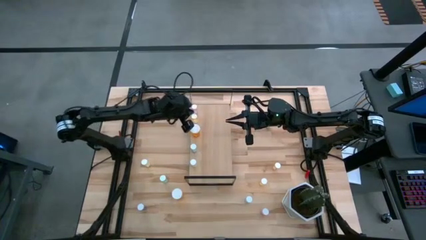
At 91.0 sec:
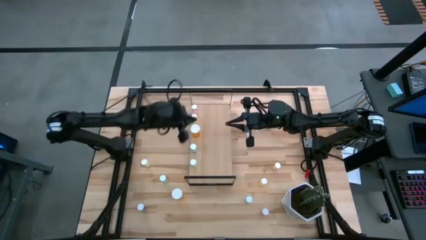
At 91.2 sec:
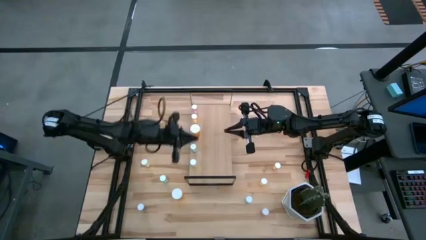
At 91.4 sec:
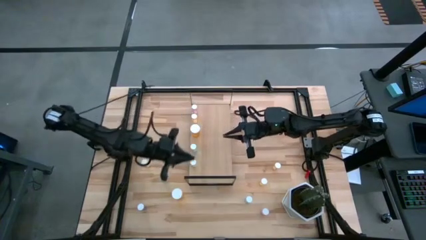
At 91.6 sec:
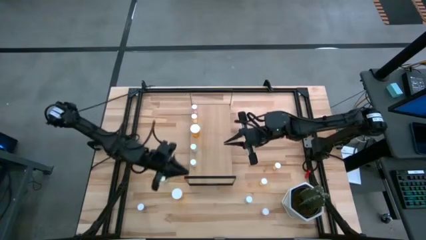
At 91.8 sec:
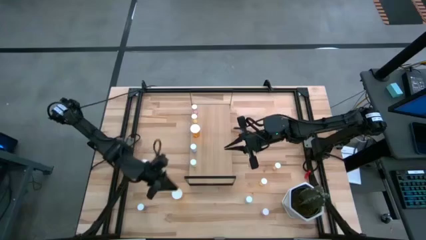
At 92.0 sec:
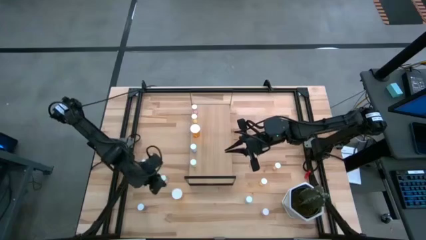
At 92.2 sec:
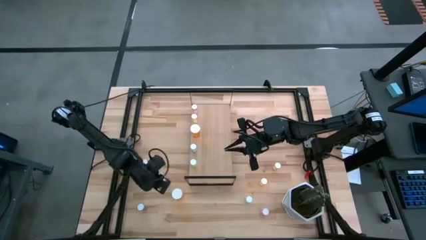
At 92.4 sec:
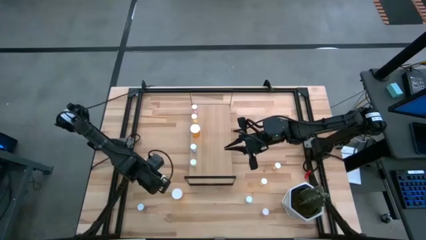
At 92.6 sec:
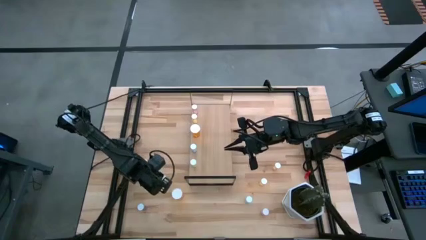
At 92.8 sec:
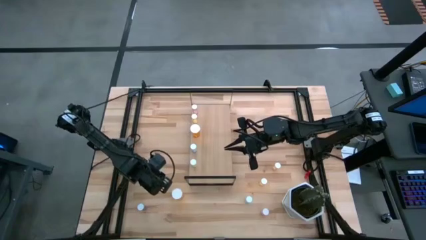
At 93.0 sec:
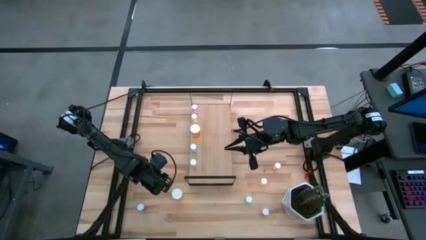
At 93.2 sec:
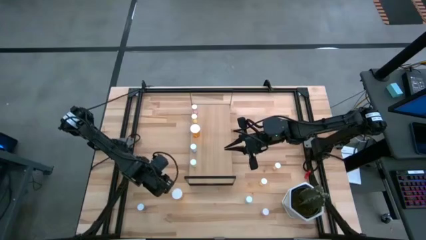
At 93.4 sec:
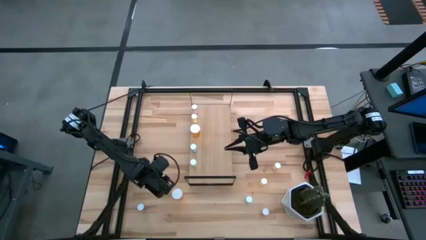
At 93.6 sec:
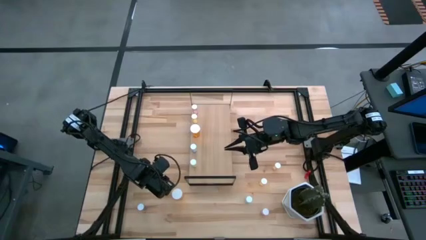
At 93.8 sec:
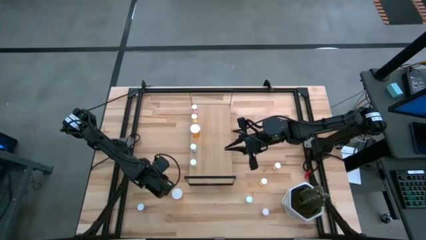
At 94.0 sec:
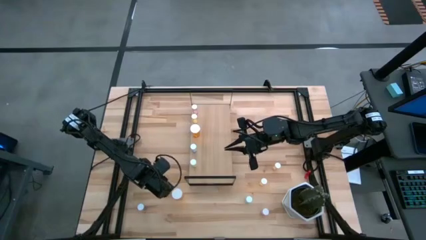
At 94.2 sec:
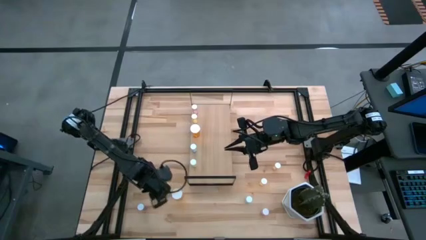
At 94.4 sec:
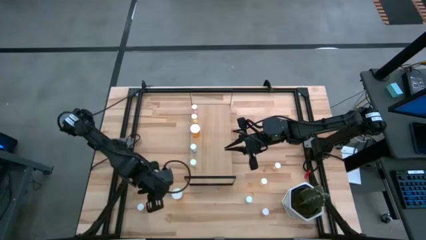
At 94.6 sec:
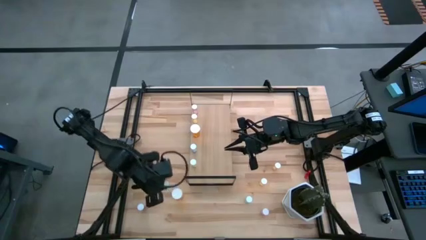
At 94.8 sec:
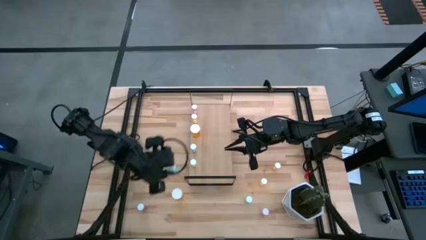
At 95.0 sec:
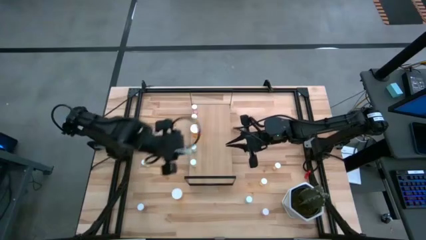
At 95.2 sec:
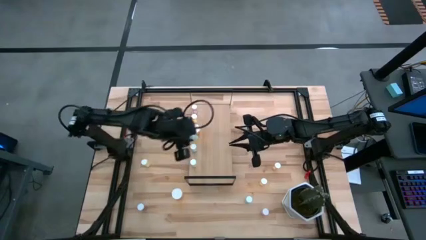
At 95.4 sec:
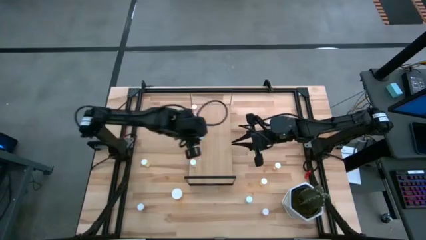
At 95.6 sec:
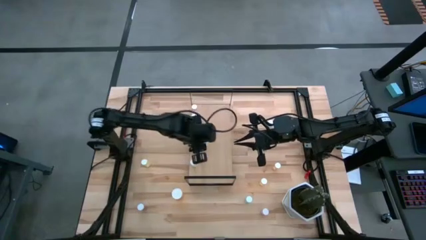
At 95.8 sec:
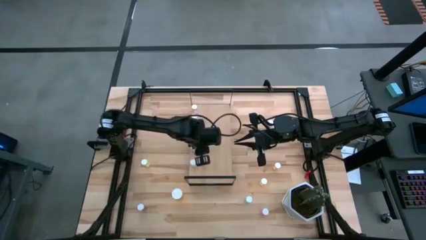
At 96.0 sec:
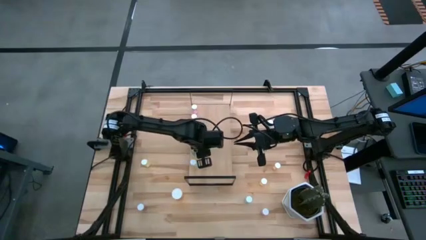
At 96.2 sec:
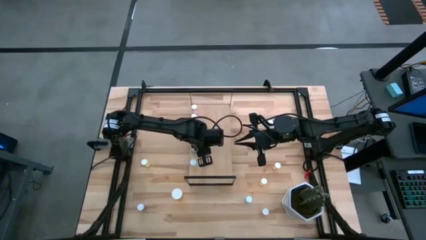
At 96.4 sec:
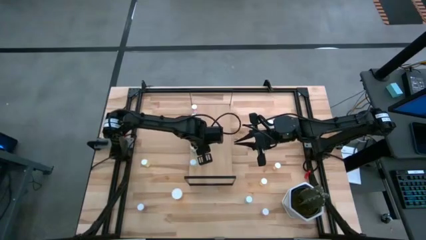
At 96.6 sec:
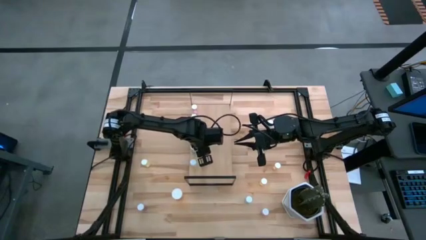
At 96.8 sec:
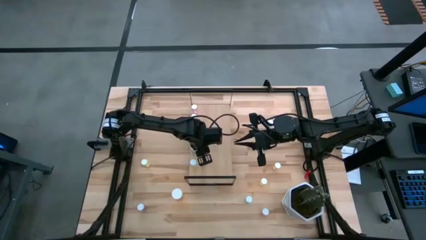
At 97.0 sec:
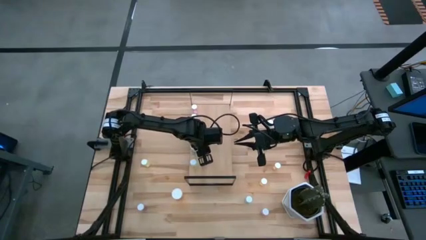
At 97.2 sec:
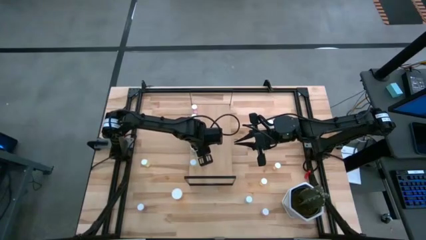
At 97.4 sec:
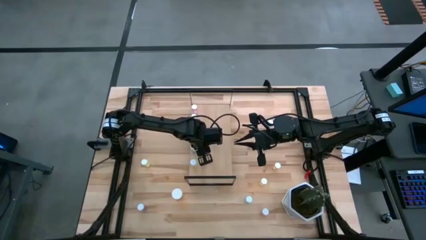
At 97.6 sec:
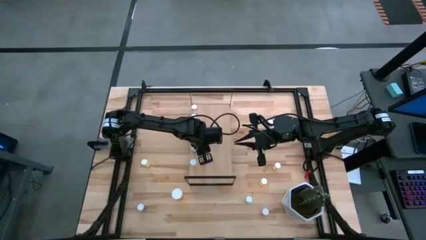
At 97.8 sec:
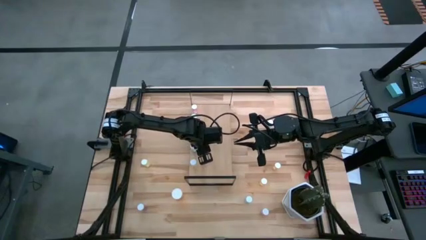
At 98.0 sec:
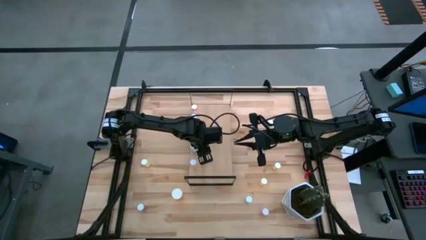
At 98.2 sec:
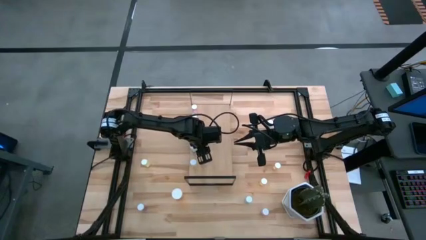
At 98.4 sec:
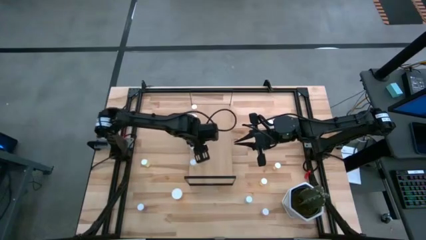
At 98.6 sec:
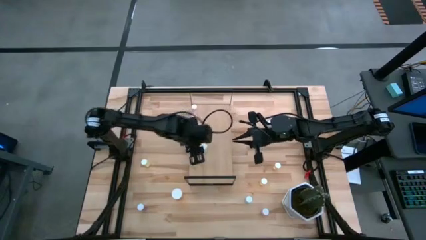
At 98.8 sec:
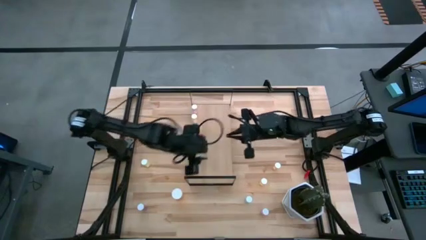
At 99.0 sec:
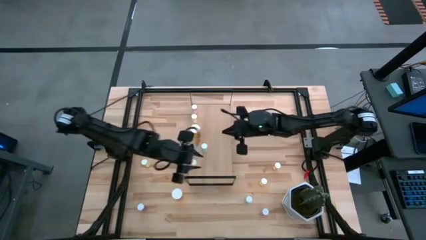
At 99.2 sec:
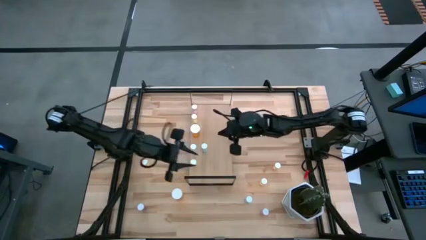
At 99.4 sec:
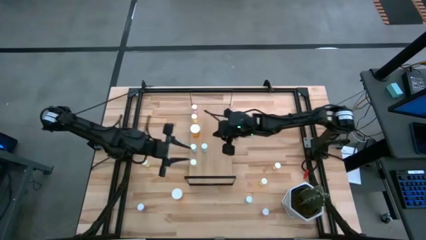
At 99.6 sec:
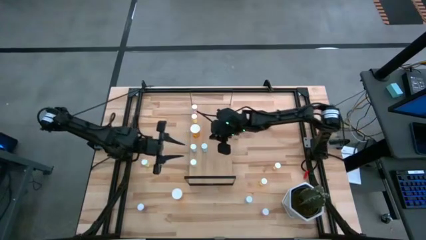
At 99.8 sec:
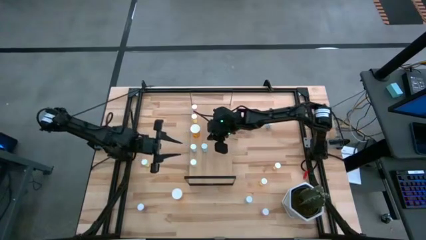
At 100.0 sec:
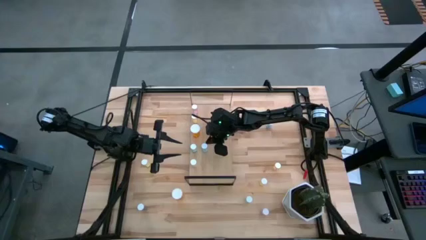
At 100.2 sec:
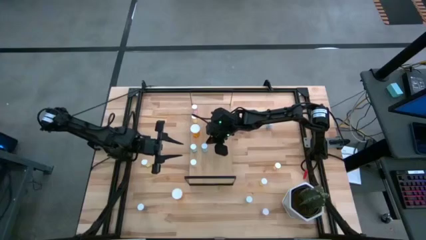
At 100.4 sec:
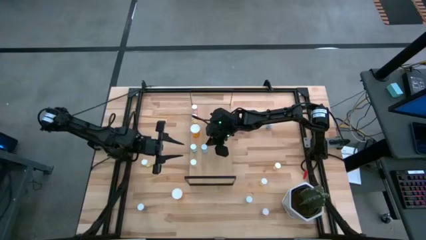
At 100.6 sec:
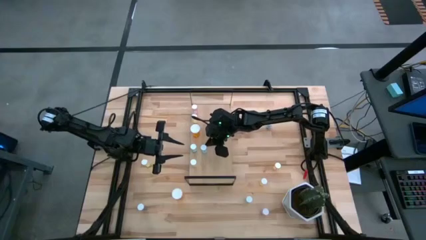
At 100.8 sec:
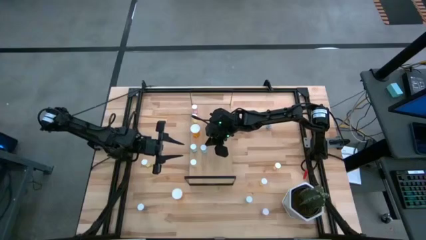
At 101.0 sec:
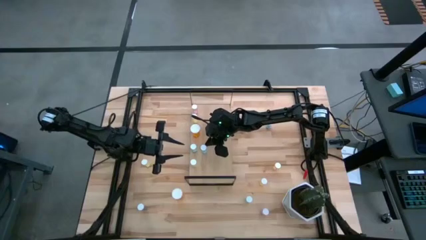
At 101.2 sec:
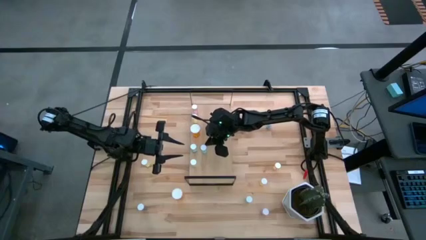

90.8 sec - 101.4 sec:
Task: Pick and place medicine bottles onto shelf by color
Put the green pill bottle on the shelf aligned with other green pill bottle

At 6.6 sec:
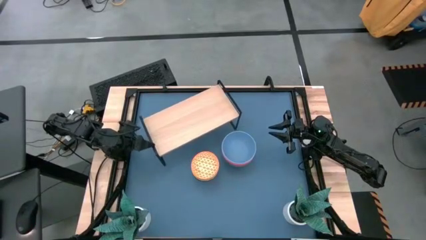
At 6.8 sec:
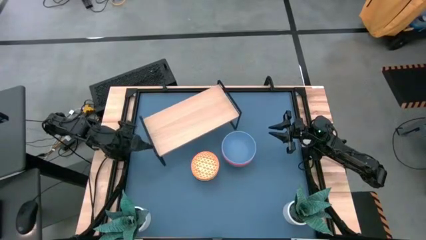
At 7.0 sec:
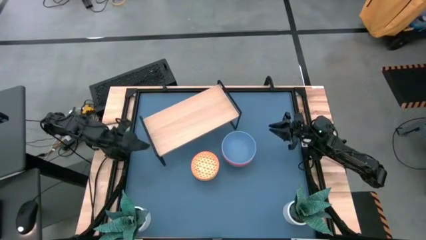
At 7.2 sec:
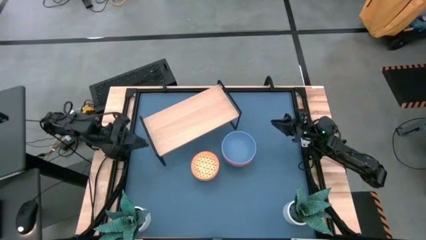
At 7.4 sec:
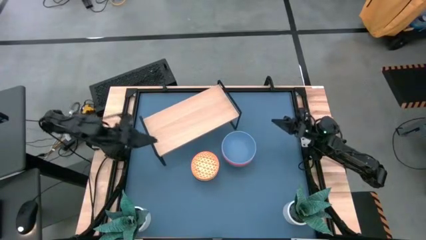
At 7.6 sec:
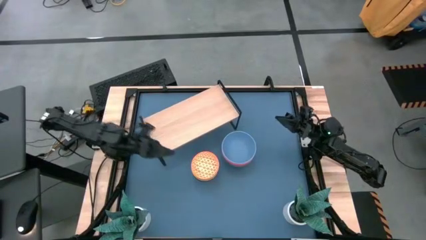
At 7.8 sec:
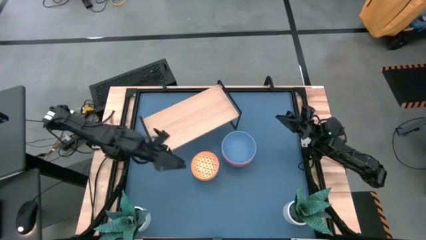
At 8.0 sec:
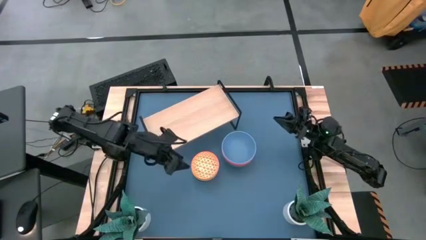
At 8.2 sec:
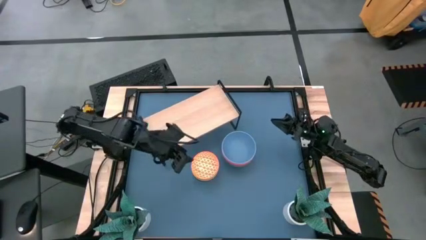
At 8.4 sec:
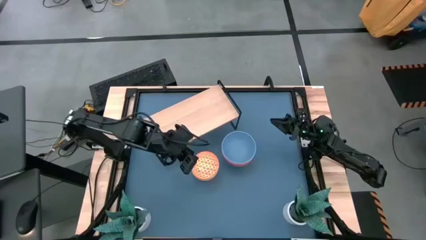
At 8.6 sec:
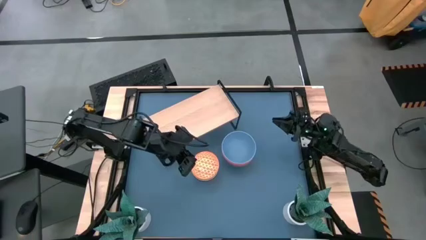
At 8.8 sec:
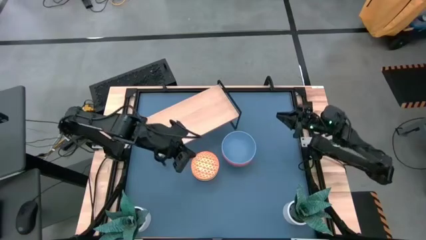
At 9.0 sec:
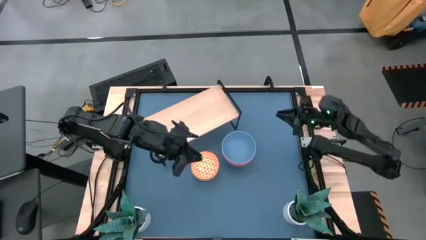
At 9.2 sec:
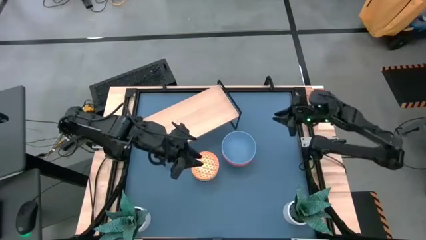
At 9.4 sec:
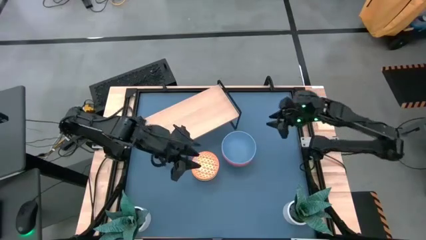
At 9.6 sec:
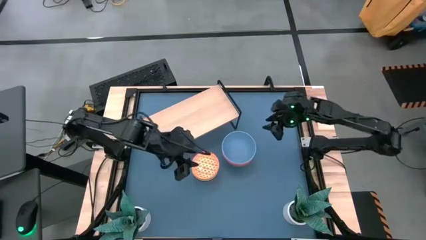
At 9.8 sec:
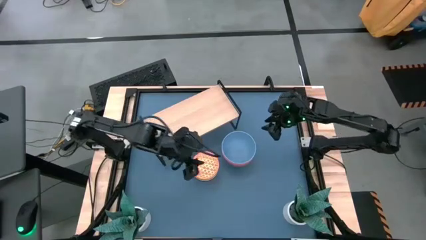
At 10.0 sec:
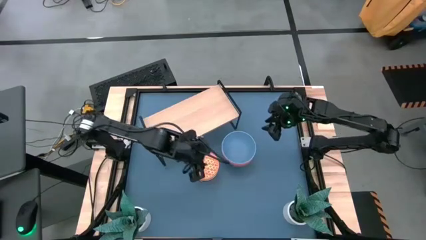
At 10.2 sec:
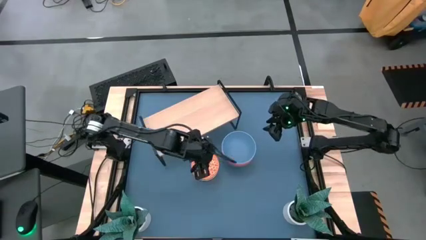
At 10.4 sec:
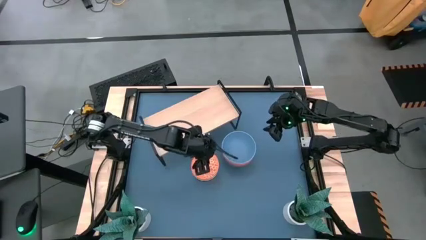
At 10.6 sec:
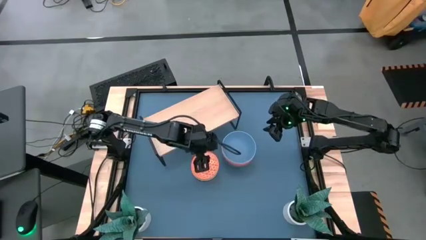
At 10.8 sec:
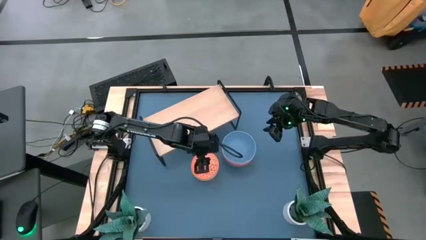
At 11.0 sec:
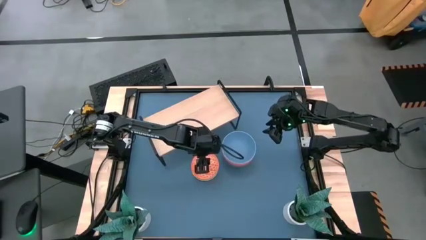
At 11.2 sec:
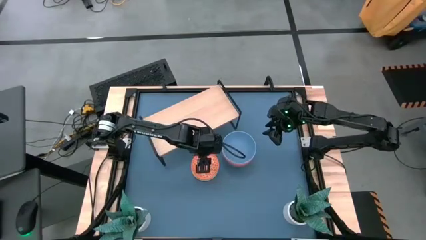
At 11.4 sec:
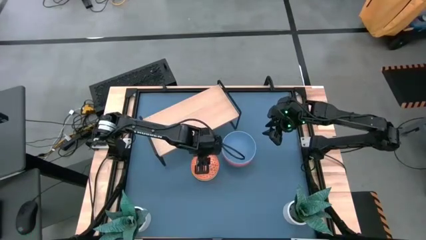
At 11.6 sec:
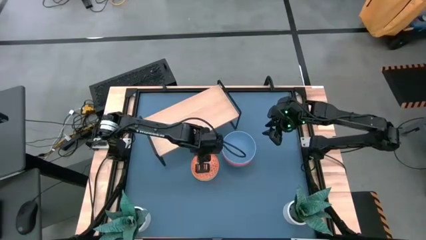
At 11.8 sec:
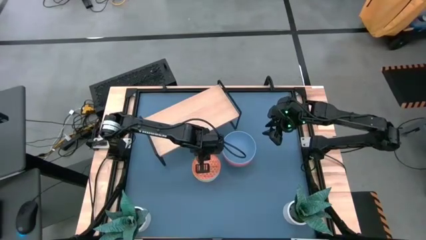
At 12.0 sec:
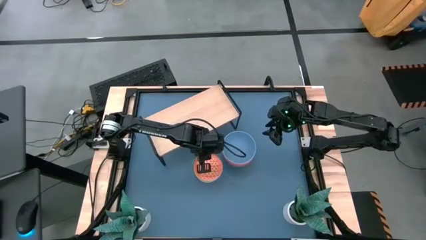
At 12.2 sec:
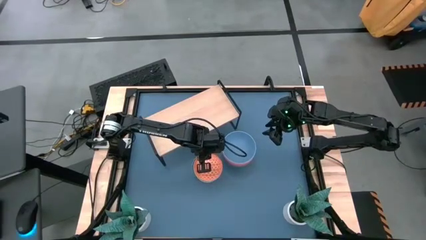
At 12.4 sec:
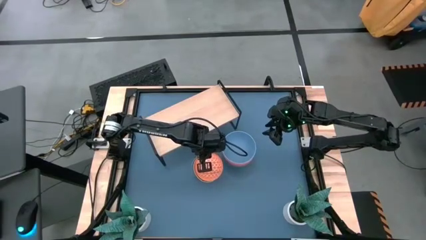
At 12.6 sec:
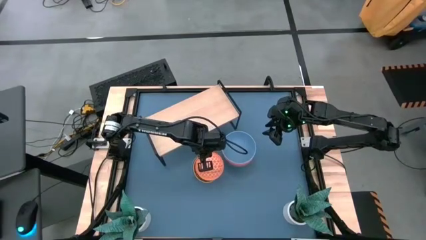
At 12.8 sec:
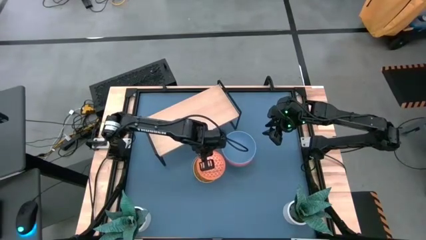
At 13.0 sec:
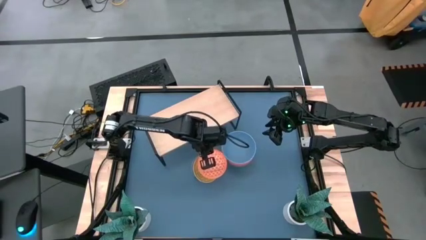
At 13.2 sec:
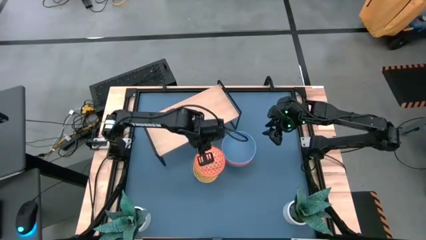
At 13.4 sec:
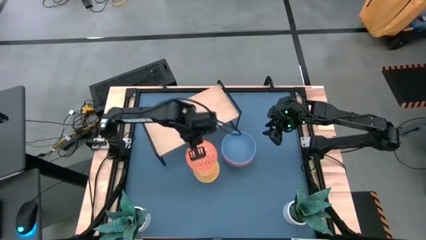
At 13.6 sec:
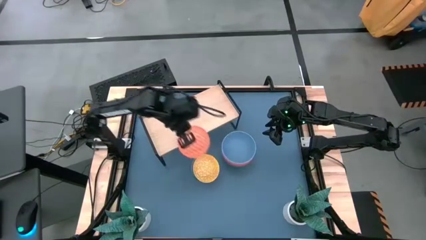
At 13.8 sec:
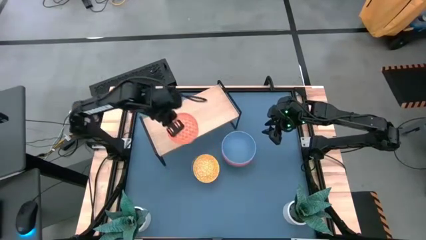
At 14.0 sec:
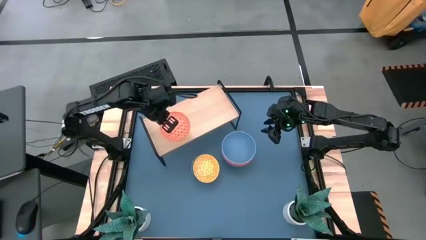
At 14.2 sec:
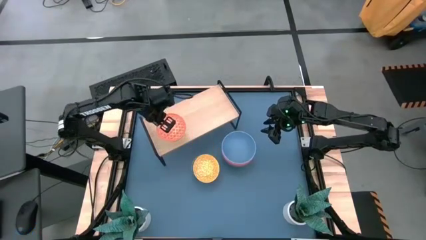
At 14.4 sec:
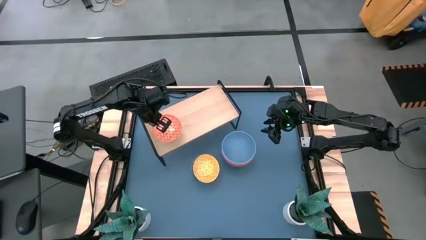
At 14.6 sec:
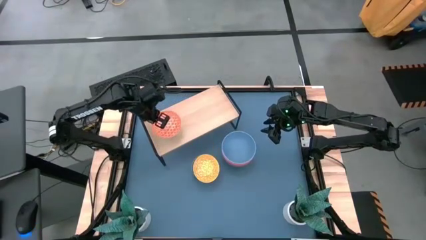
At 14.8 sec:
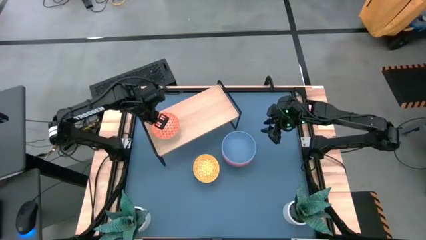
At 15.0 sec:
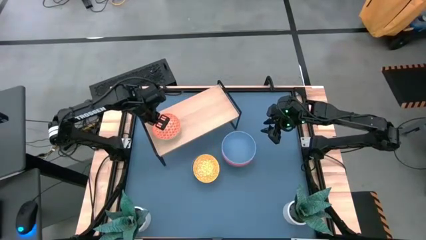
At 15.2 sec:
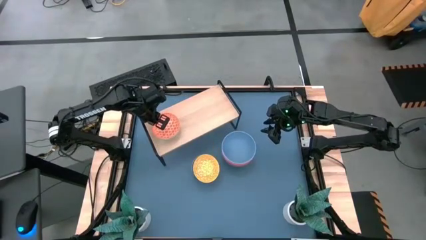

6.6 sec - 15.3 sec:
Task: Place and stack bowls onto a shelf
Put the small orange bowl on the shelf
